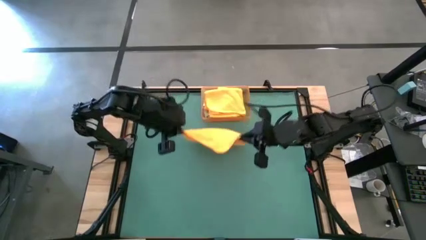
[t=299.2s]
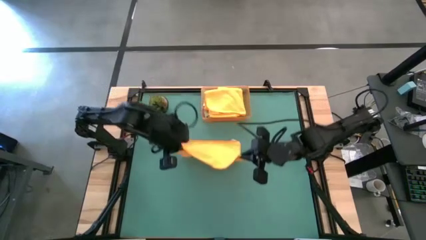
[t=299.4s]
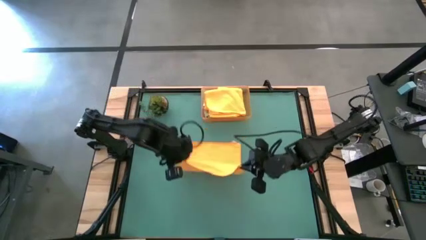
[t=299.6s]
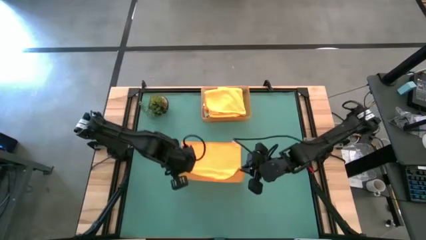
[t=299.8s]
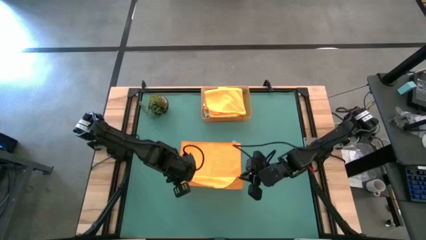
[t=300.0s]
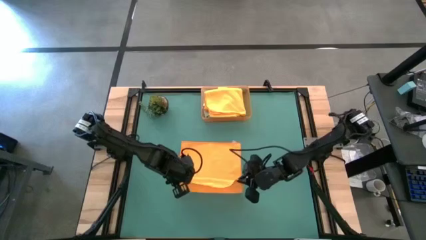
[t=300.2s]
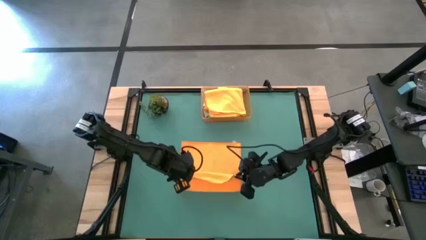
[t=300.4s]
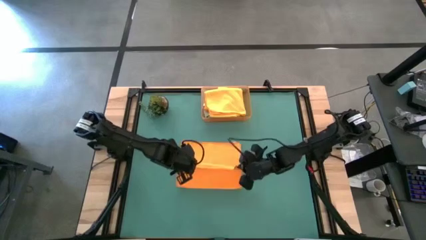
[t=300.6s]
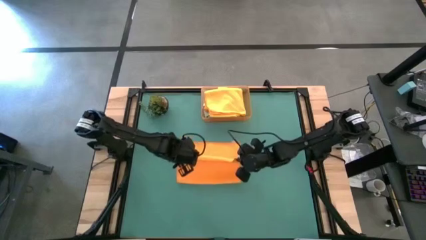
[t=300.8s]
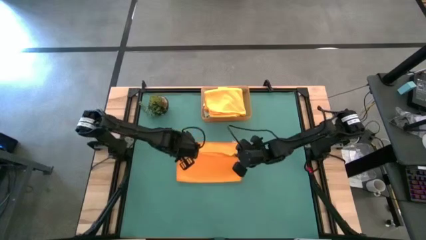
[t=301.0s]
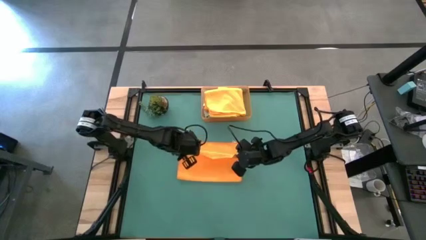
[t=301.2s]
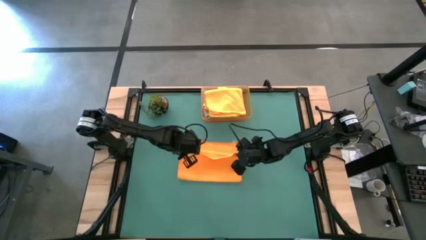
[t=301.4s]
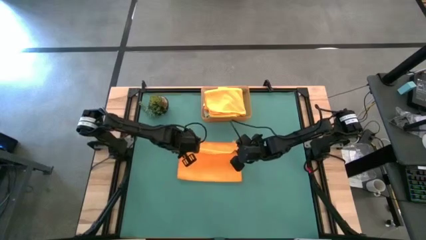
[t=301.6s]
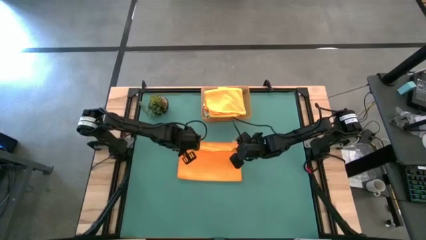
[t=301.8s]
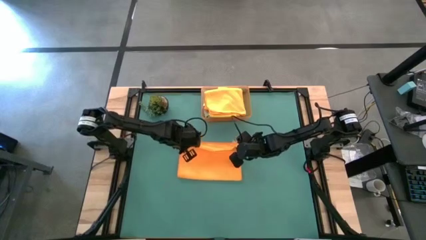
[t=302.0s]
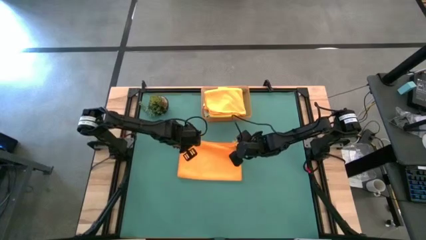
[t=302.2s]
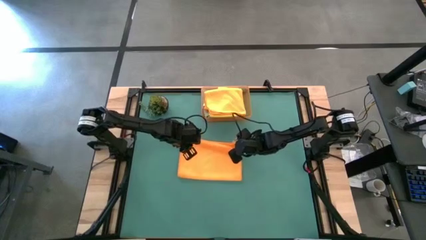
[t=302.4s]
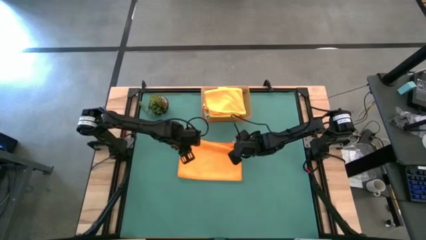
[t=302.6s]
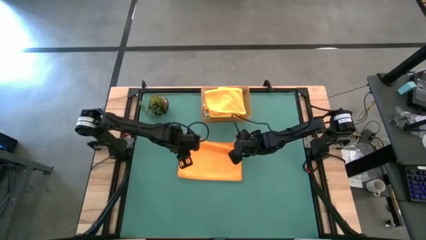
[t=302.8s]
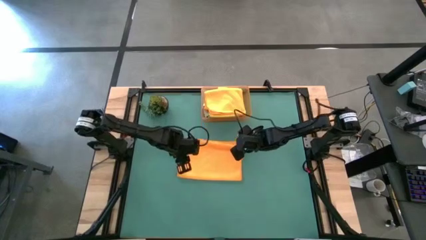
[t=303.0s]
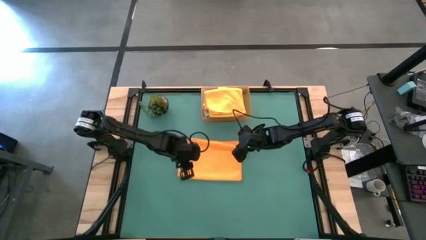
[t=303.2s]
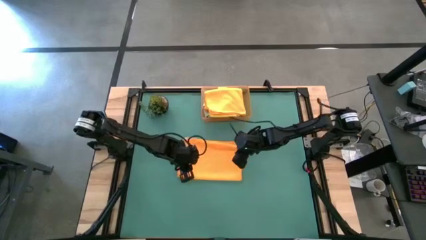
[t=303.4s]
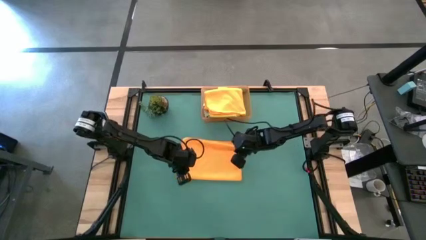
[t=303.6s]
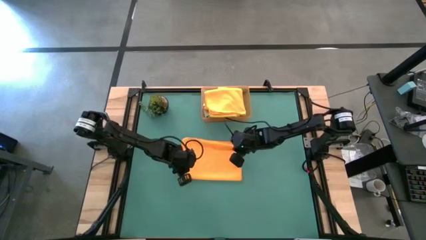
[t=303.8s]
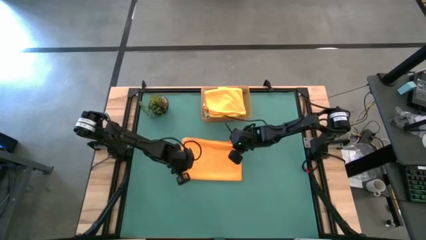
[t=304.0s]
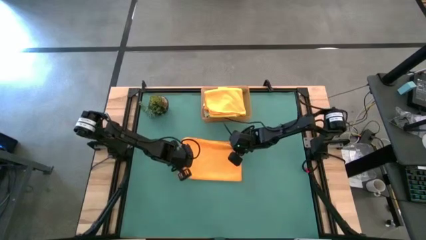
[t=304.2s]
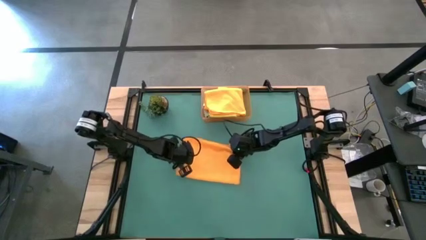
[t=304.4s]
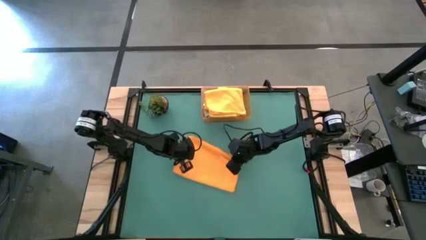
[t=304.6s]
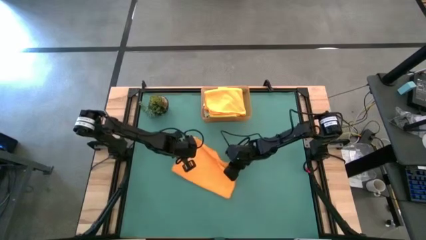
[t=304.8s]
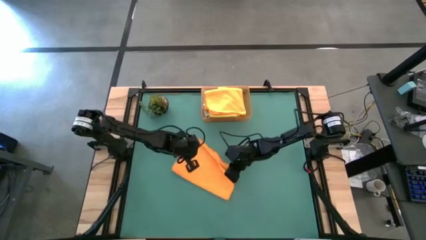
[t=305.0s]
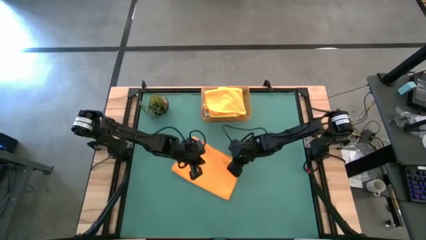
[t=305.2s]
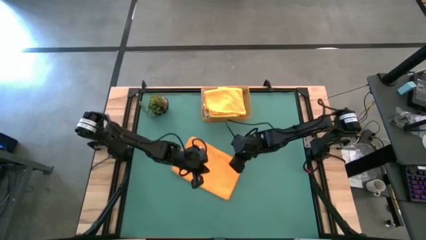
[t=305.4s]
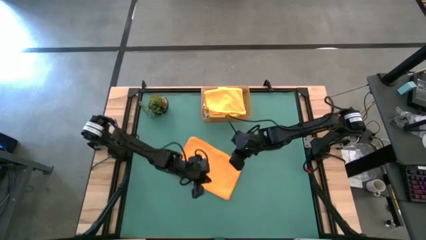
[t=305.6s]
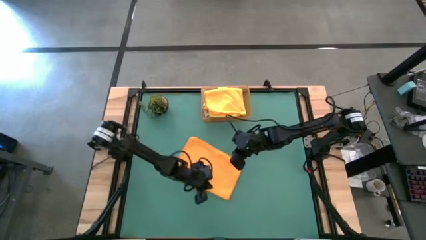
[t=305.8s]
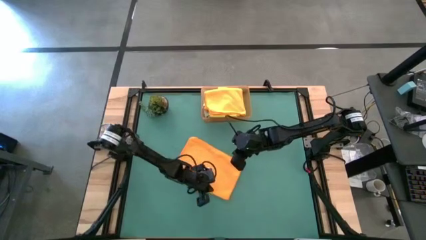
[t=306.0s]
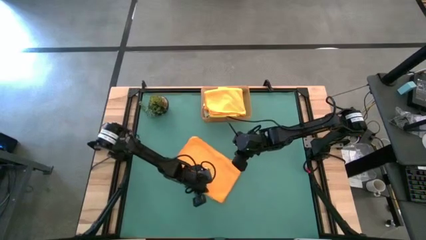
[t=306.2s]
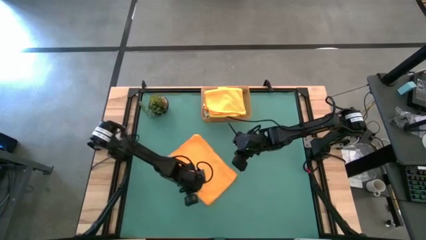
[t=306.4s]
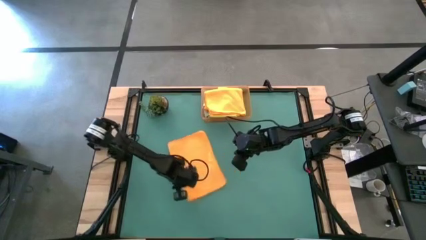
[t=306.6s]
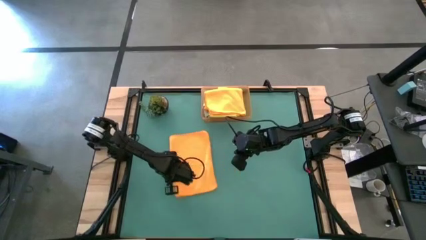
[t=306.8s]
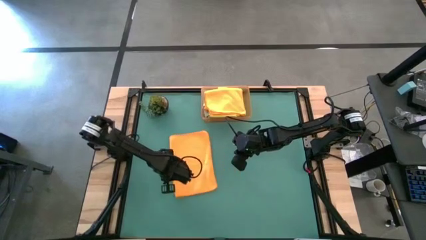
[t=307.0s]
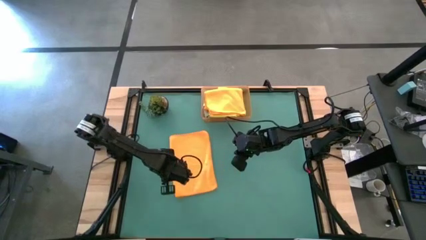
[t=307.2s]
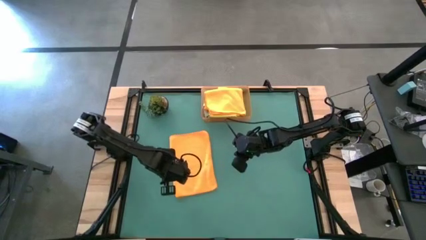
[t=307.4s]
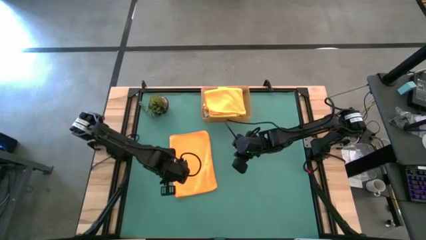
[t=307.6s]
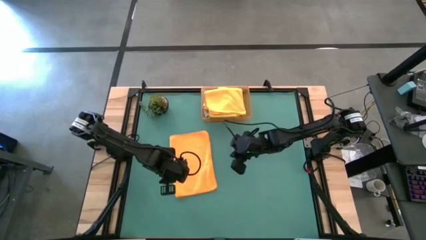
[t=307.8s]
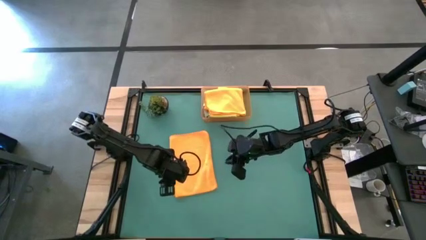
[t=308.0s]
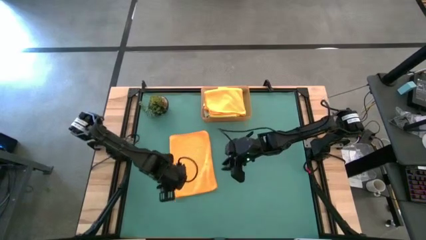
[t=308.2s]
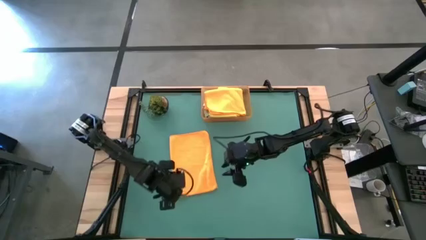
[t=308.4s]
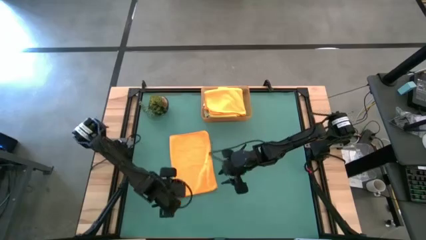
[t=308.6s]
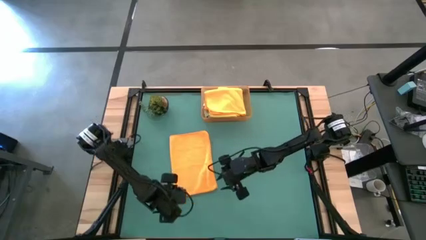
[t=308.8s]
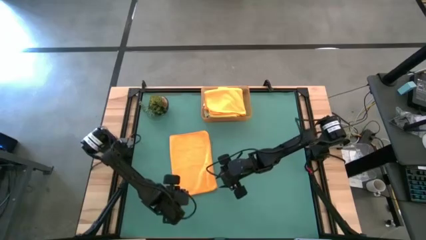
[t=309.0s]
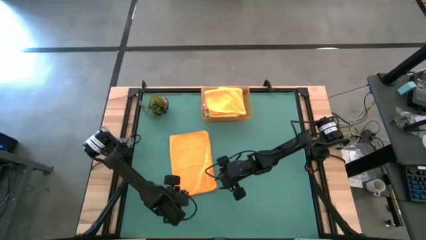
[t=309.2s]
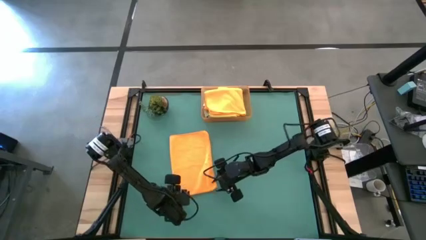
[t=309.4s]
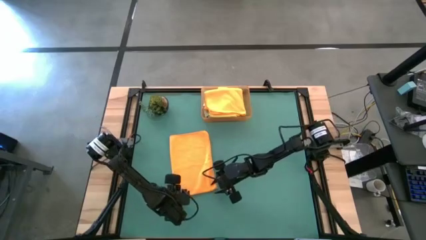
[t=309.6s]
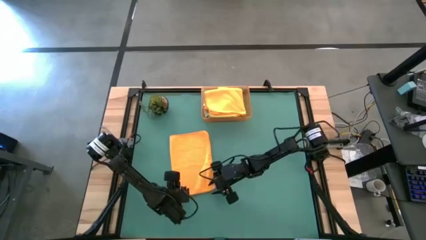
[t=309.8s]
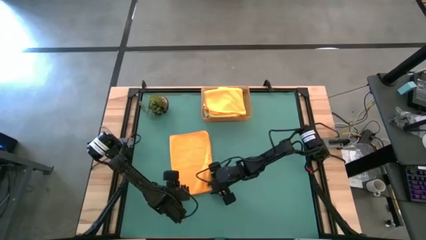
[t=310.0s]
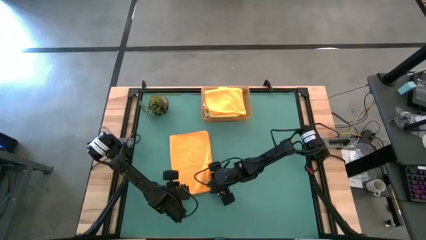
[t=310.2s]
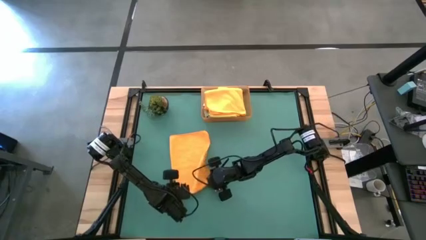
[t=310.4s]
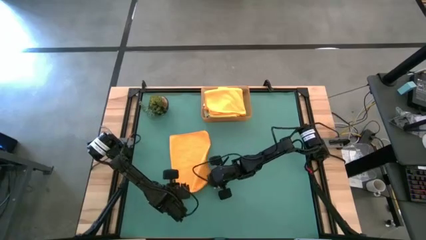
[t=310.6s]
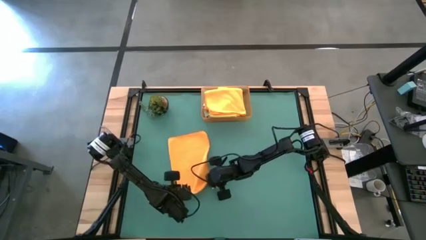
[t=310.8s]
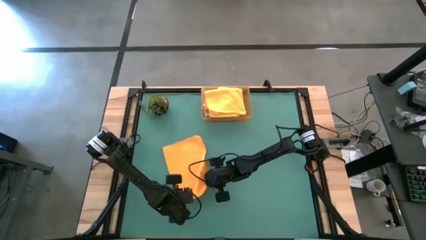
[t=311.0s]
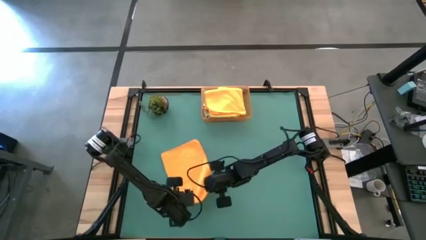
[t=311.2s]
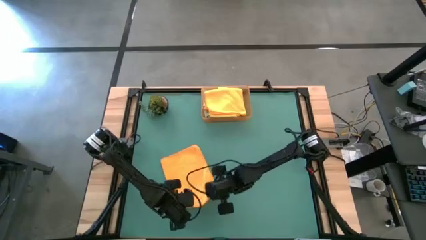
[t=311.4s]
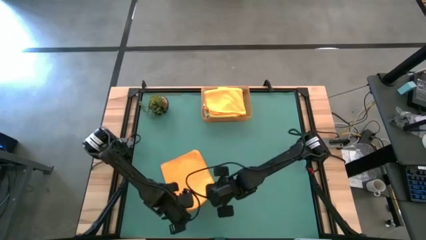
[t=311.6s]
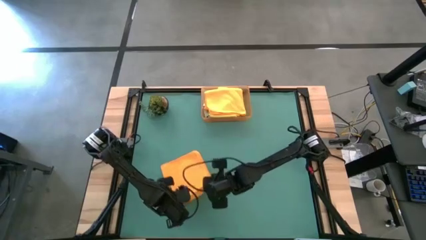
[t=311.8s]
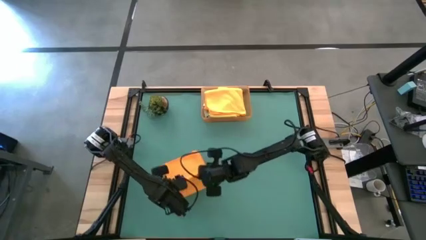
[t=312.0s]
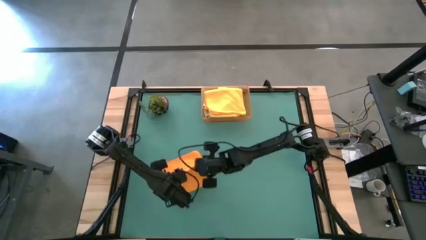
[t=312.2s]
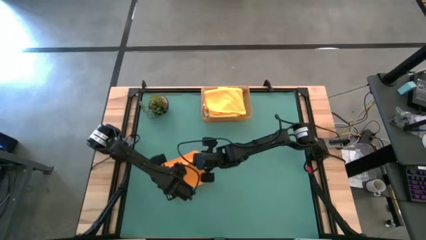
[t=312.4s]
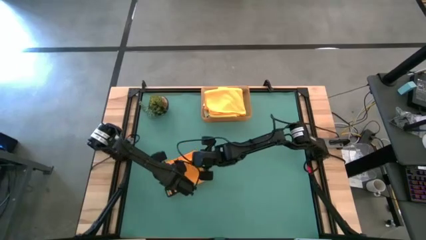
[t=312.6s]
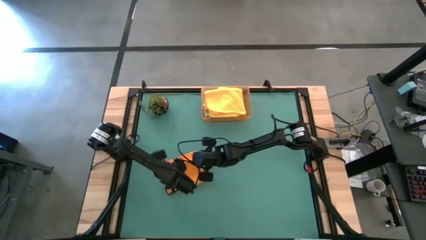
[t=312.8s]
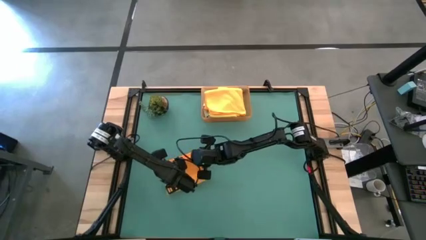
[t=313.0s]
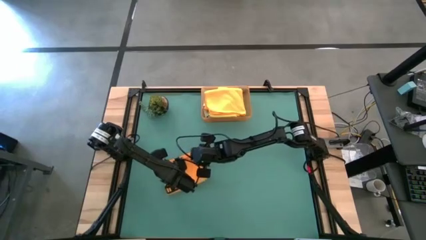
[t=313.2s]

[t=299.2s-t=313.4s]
Task: Fold microfiber towels
Fold the orange microfiber towel
